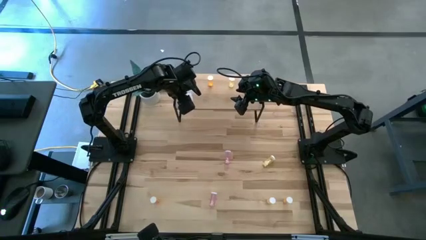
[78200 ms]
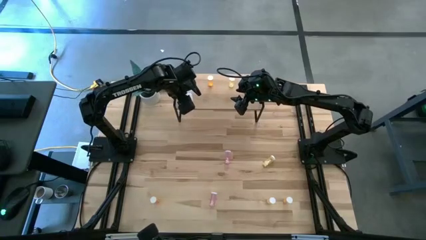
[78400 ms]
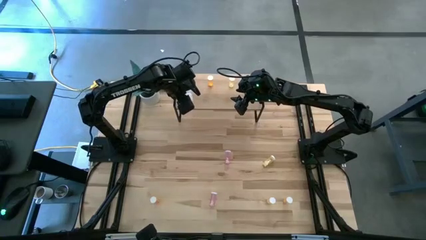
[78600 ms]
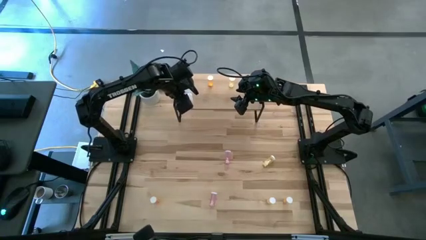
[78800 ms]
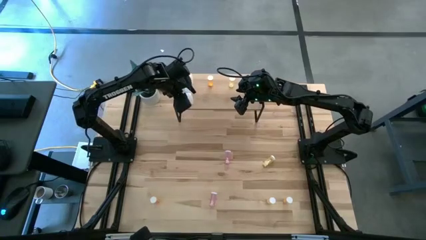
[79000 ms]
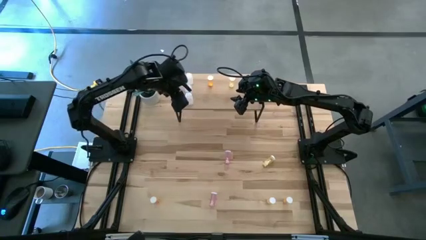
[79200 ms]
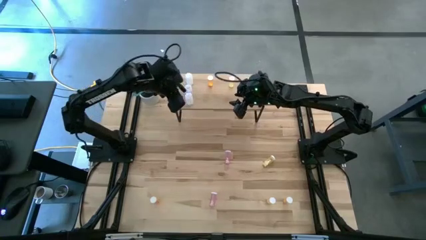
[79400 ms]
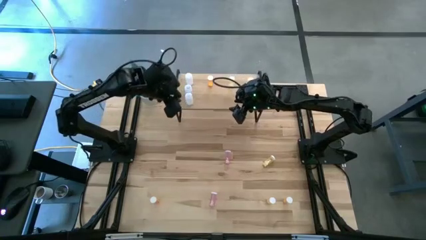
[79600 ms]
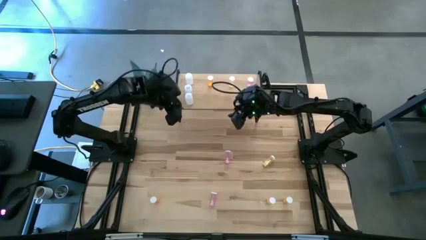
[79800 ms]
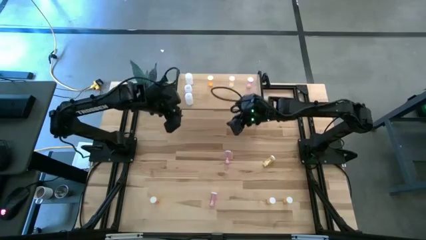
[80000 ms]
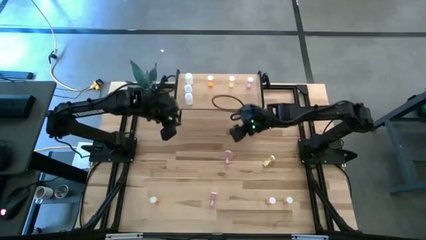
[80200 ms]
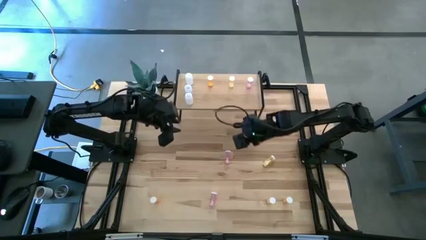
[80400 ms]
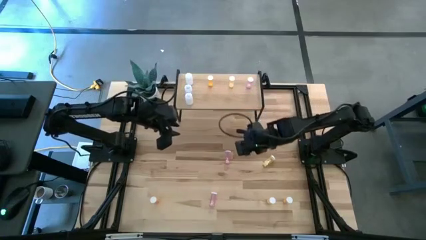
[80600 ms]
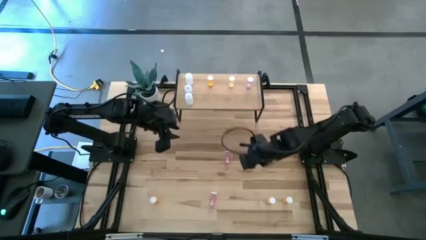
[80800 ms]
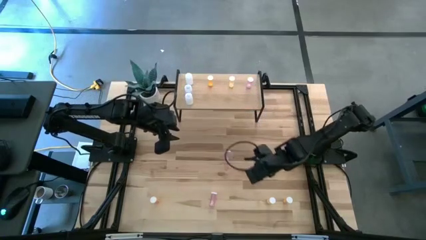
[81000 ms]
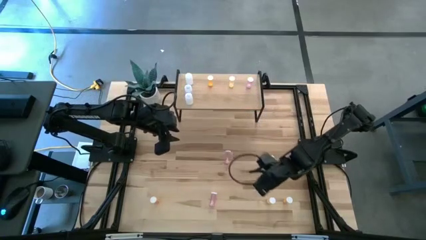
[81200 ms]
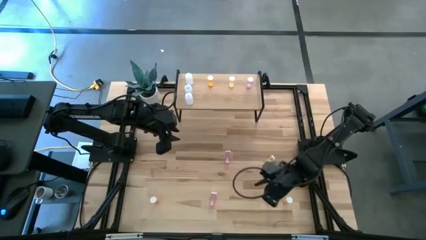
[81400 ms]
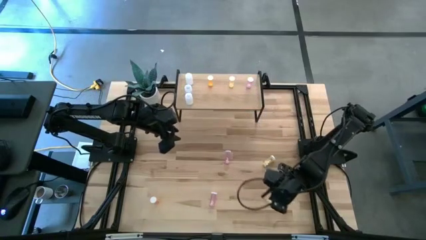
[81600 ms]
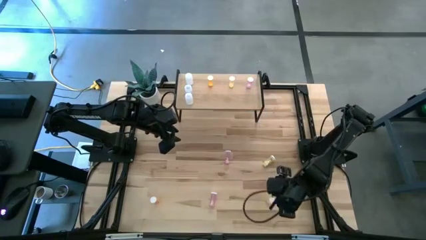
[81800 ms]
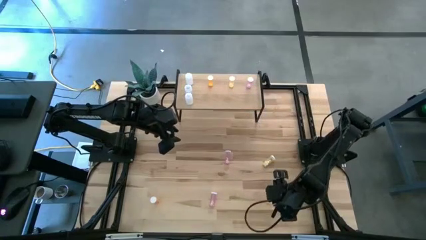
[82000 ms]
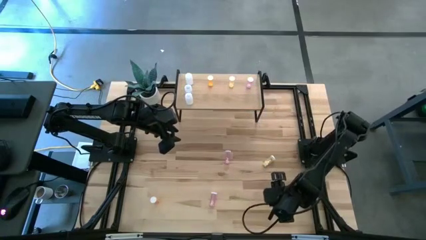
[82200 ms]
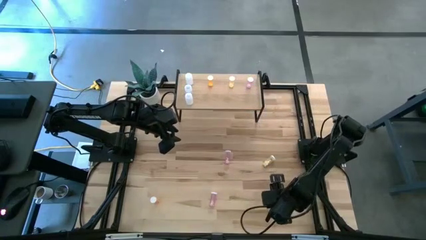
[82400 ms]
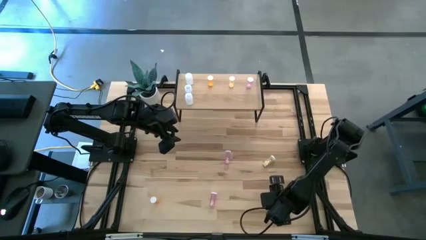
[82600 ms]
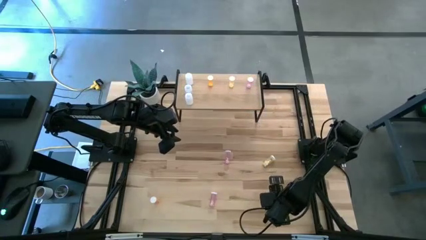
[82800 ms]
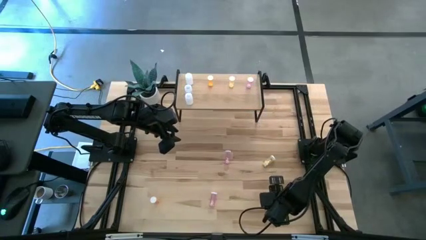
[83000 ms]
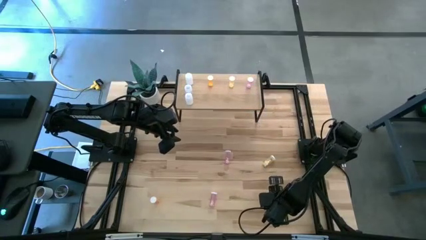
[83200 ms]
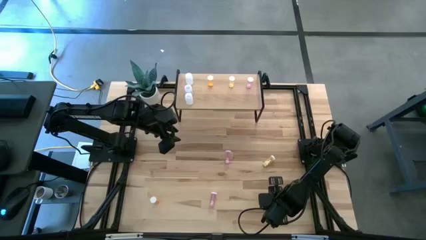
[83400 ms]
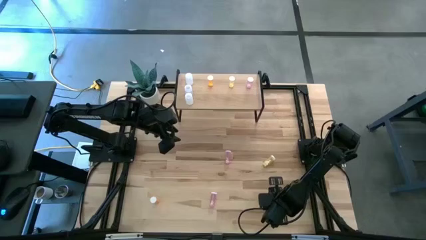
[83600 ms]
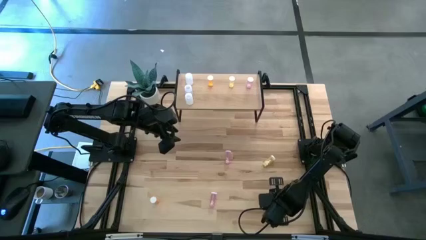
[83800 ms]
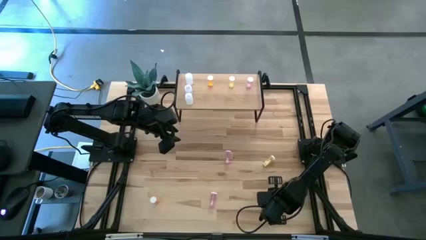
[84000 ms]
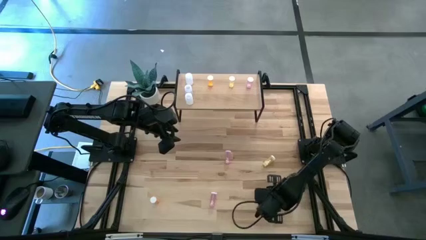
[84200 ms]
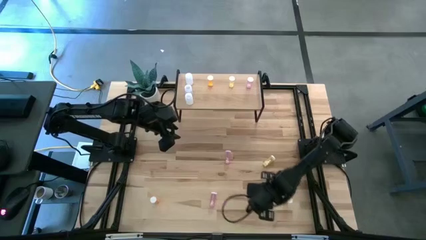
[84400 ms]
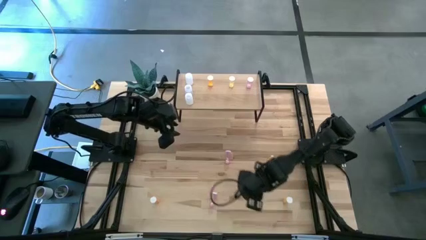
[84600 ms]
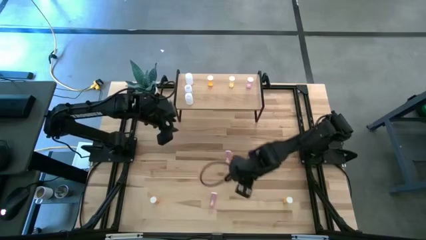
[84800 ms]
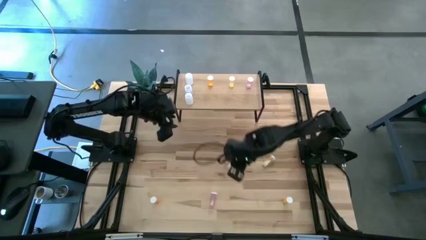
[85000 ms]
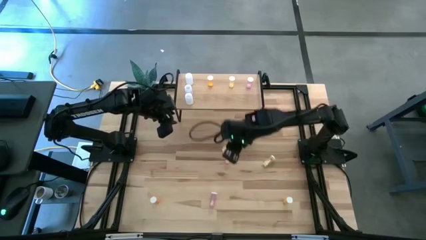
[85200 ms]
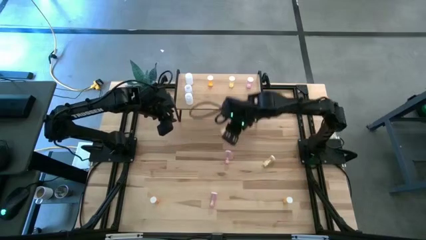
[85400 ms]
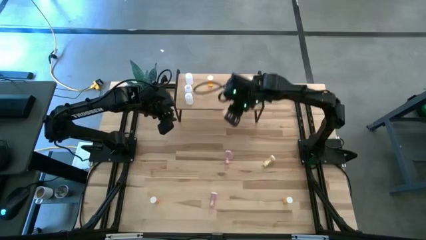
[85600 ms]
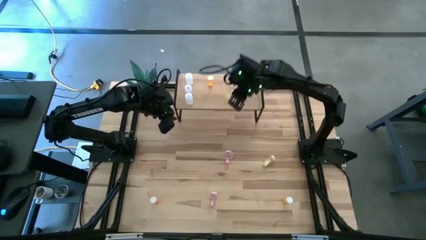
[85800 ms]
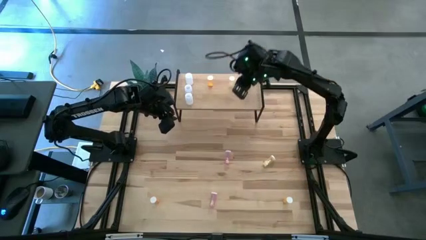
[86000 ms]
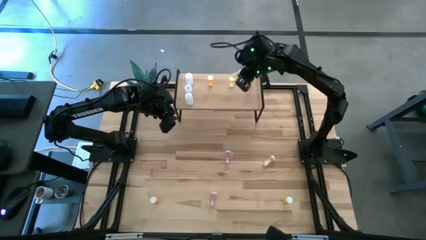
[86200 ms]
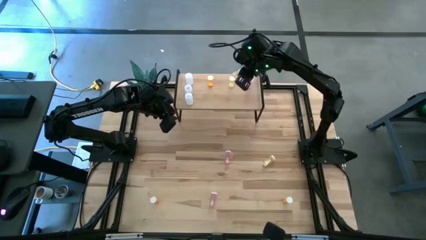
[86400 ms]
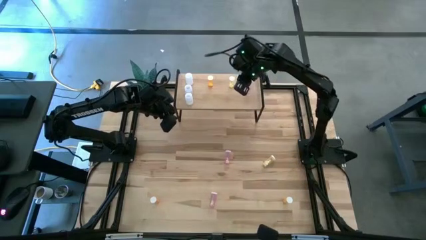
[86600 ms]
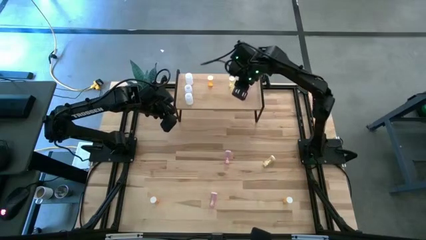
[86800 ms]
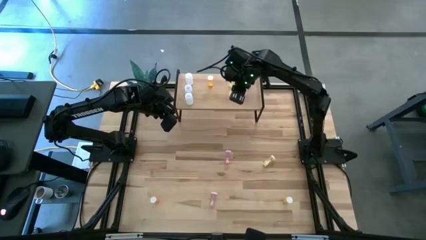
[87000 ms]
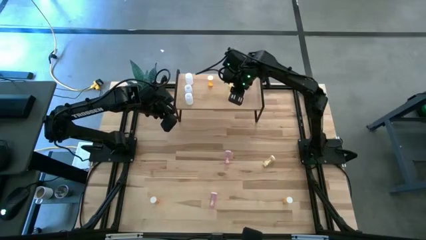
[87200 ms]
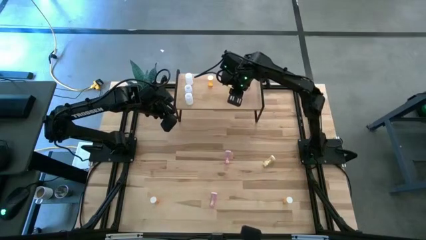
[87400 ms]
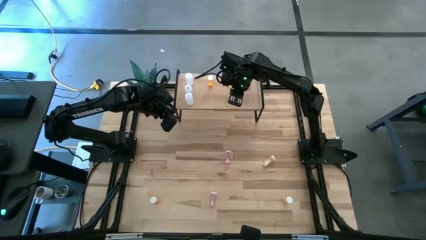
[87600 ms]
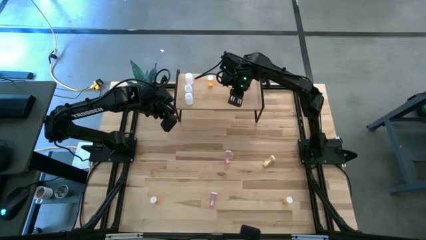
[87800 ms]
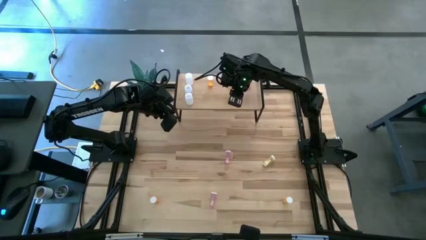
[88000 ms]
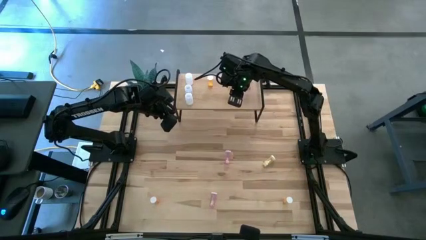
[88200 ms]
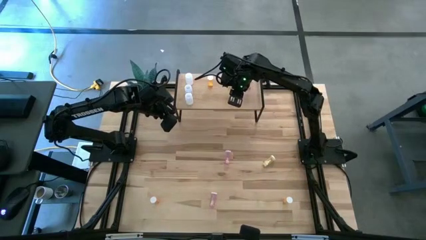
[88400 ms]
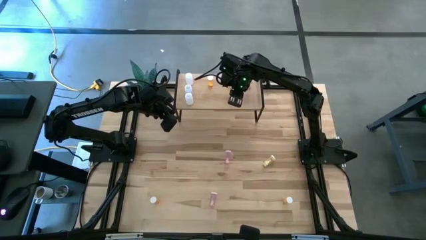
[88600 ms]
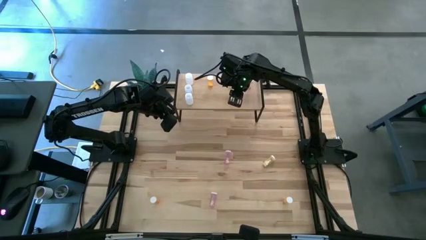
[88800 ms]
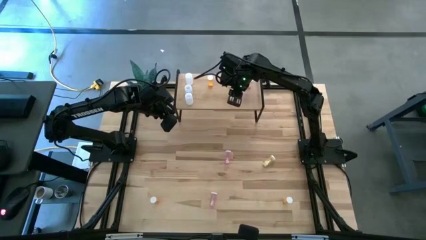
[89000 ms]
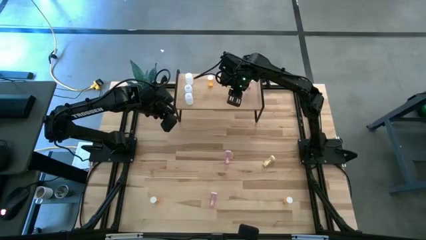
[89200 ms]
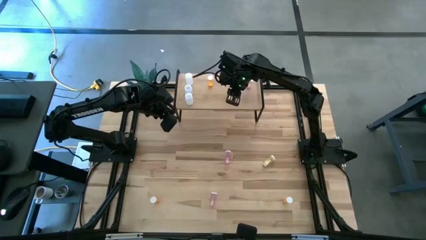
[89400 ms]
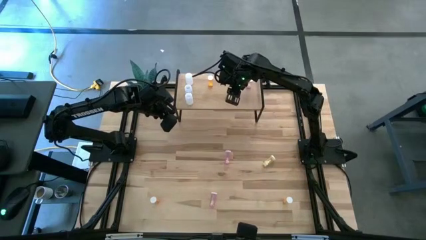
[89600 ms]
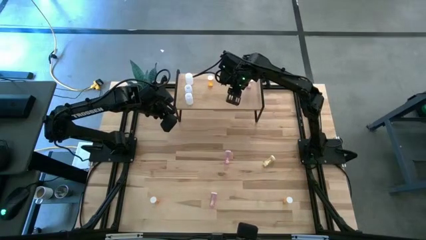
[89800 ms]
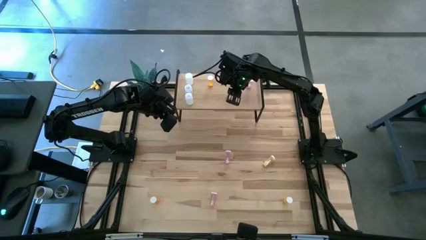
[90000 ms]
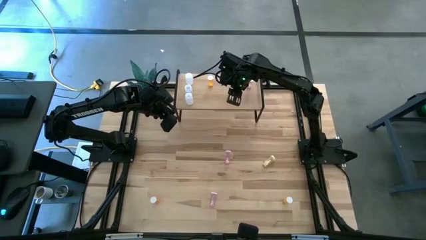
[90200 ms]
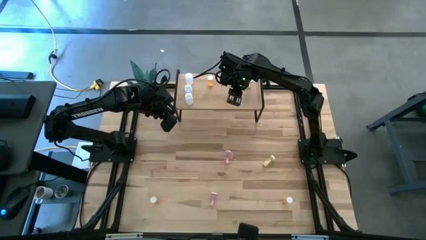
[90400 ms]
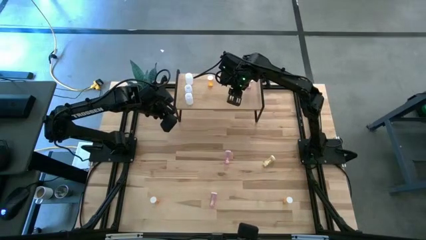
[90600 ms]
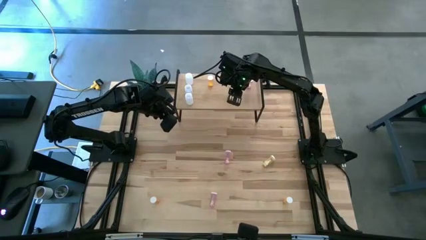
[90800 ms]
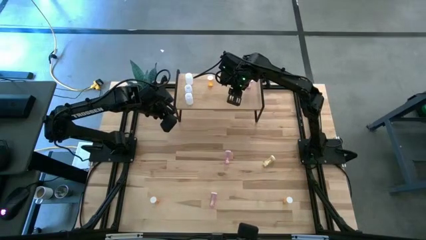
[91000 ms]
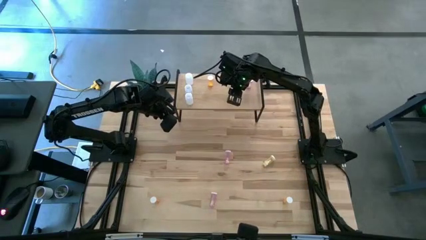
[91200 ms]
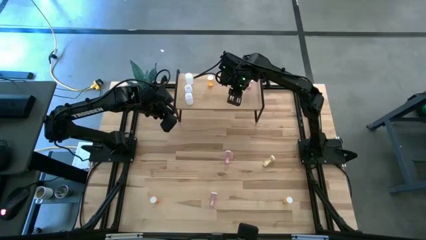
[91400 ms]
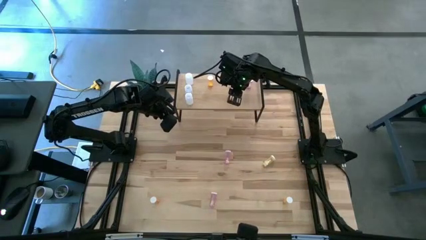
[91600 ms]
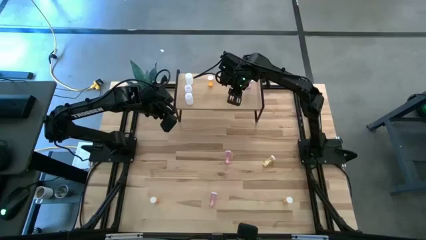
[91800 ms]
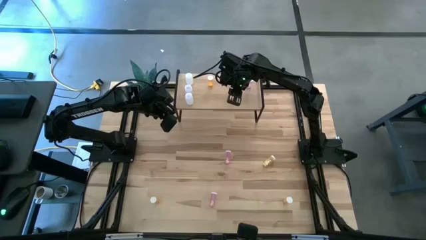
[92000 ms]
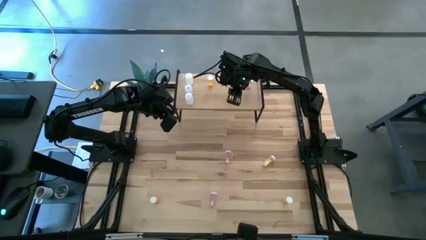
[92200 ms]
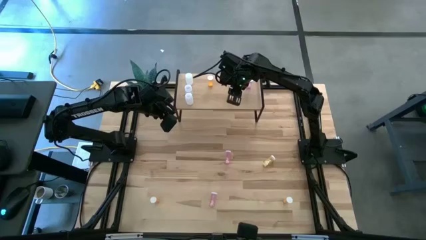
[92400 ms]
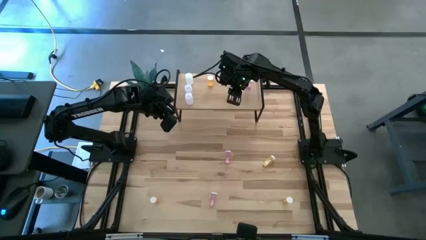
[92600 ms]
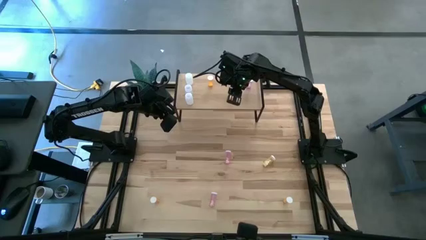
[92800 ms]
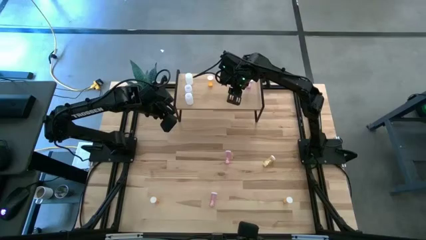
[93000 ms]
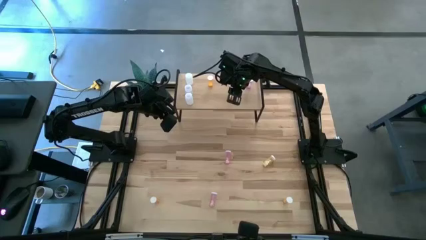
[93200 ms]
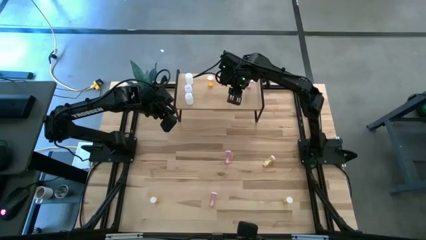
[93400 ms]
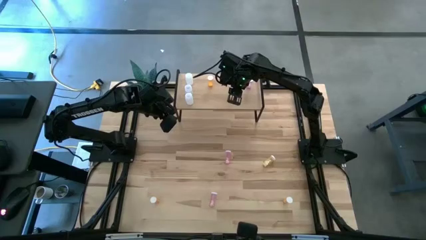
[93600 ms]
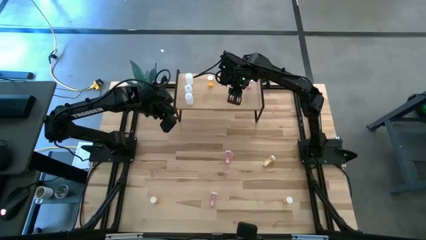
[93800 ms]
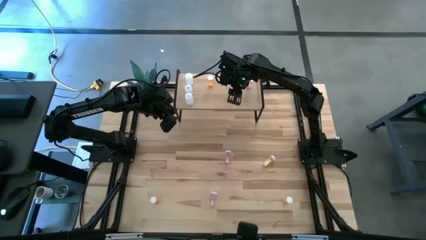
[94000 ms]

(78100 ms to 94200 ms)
Task: Pick and place medicine bottles onto shelf by color
Put the bottom yellow pill bottle on the shelf aligned with the other yellow pill bottle
